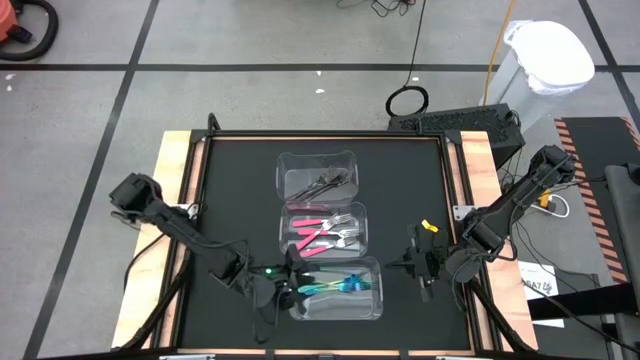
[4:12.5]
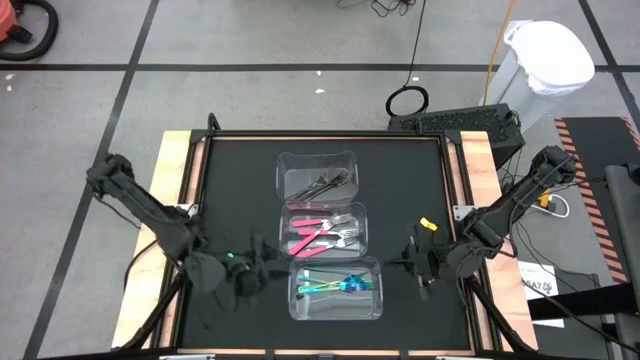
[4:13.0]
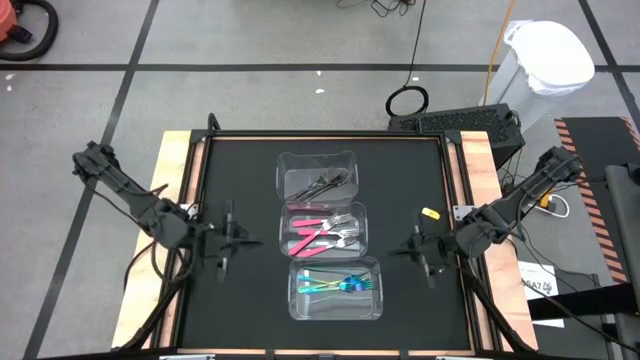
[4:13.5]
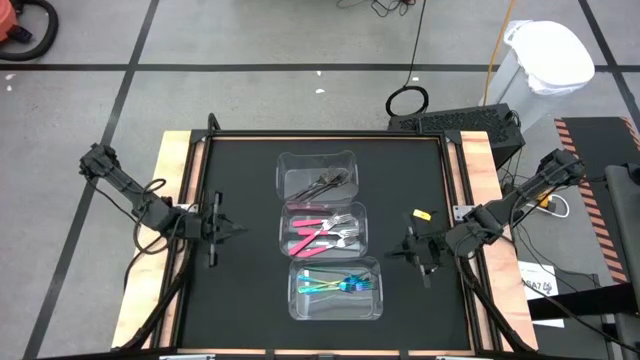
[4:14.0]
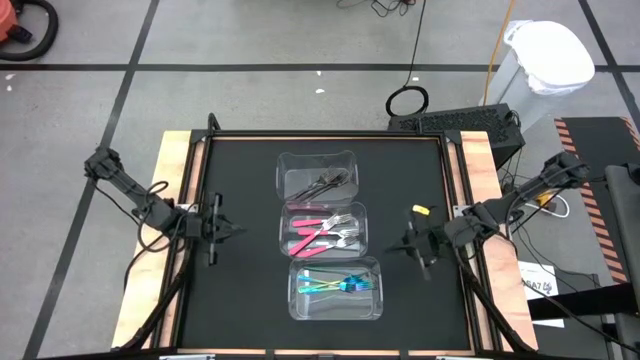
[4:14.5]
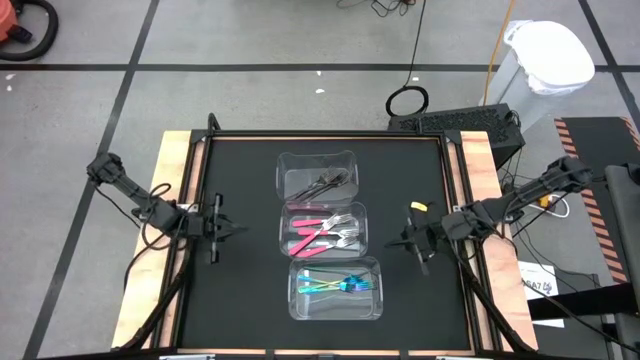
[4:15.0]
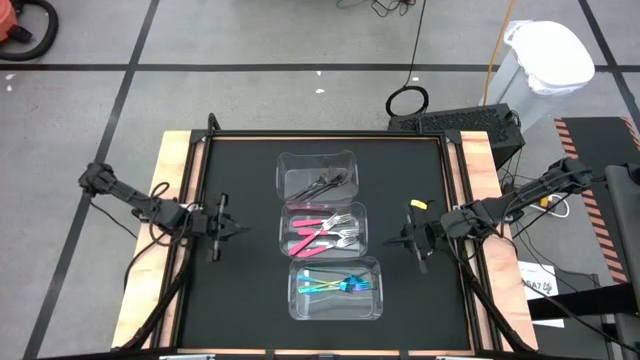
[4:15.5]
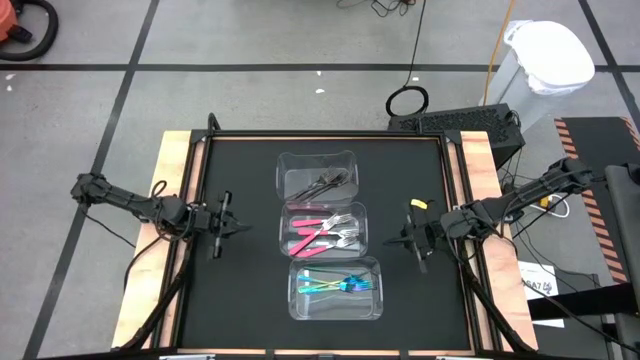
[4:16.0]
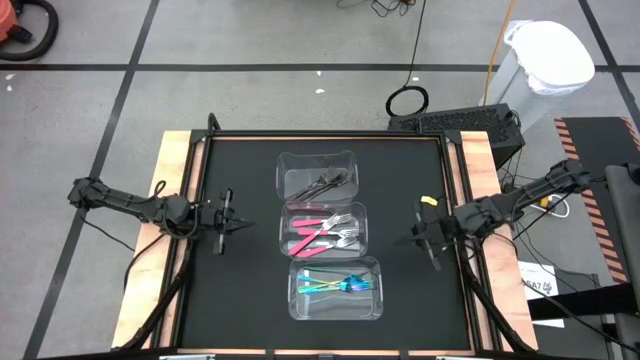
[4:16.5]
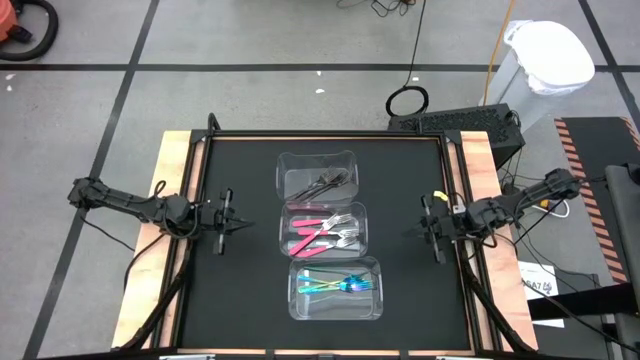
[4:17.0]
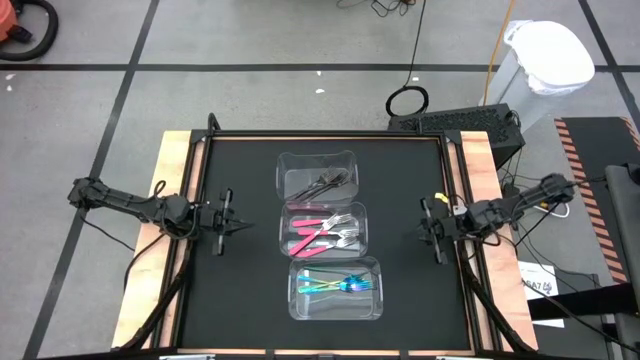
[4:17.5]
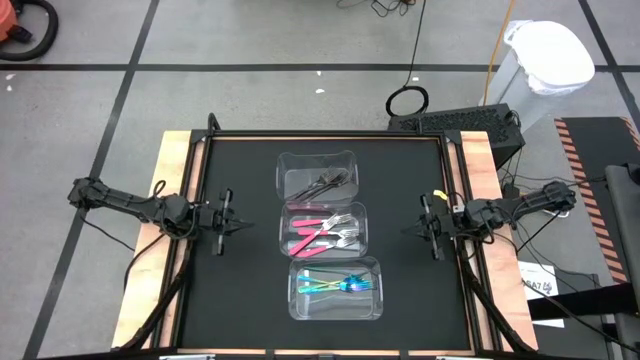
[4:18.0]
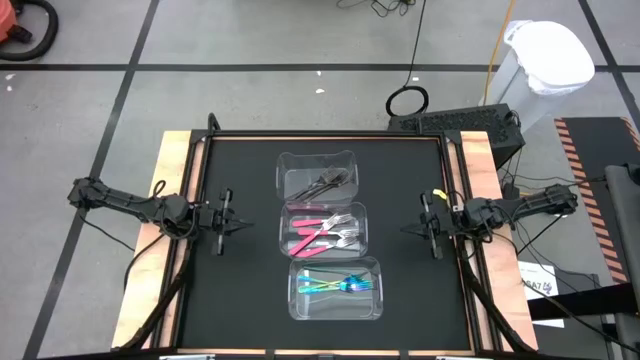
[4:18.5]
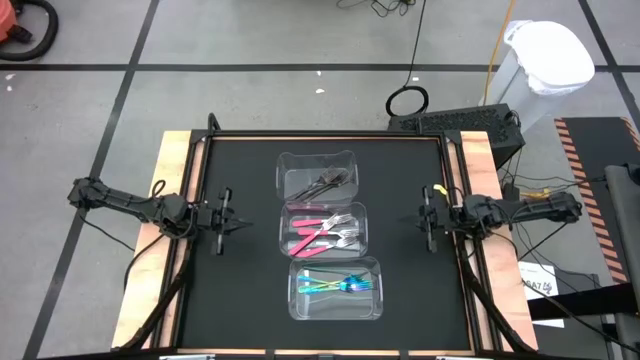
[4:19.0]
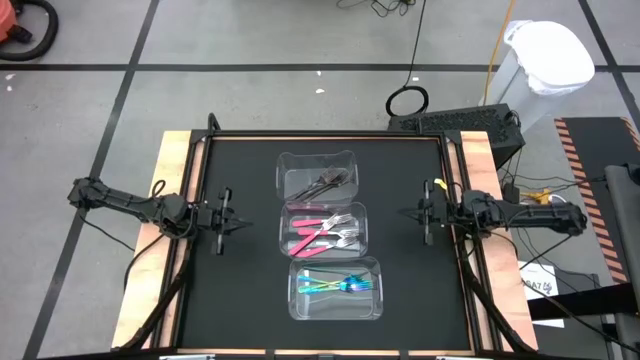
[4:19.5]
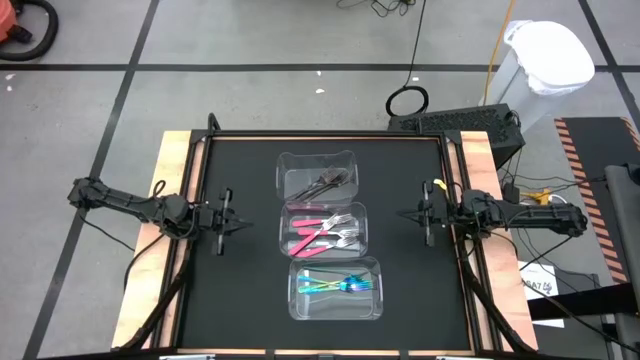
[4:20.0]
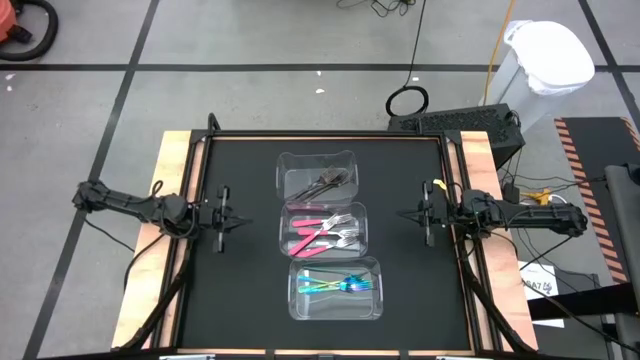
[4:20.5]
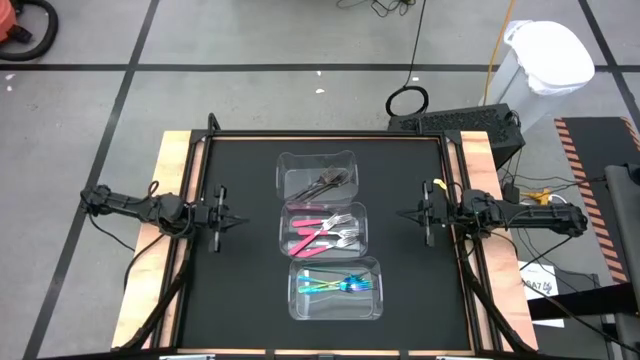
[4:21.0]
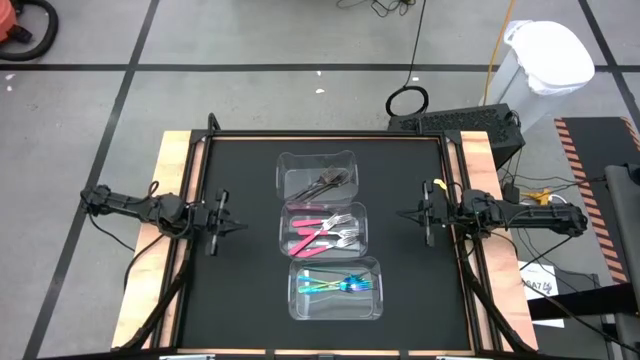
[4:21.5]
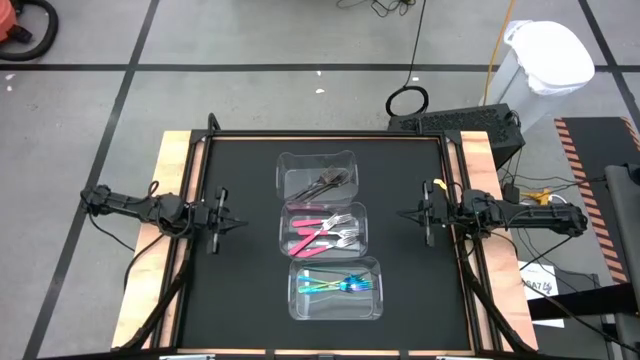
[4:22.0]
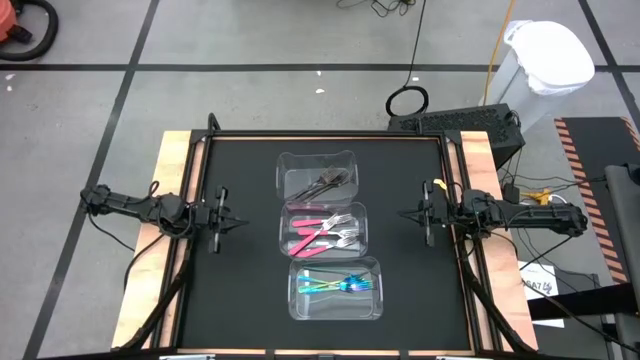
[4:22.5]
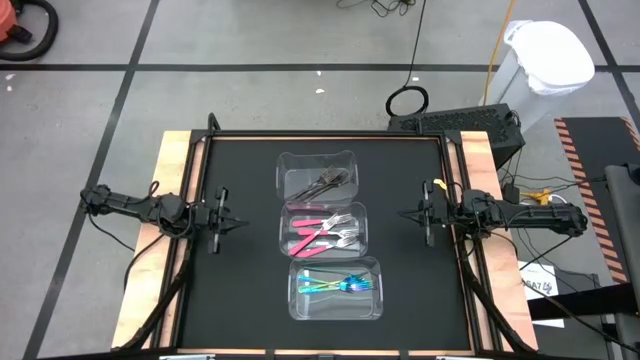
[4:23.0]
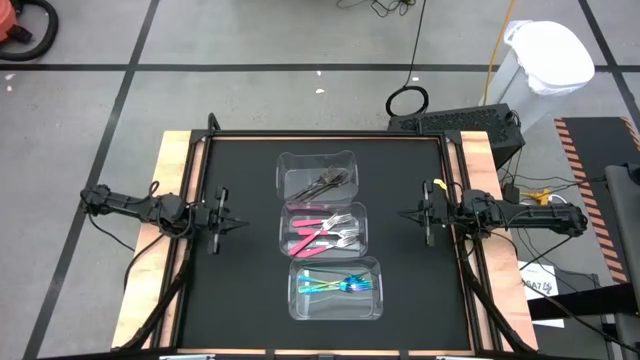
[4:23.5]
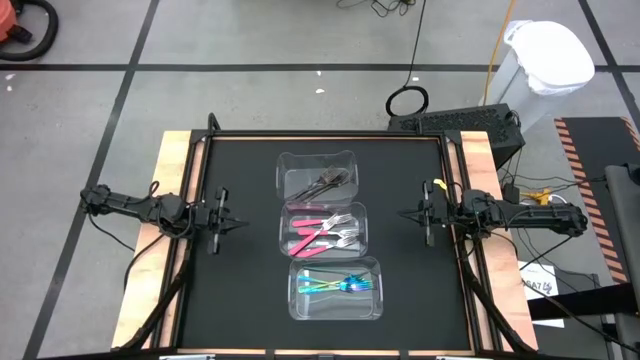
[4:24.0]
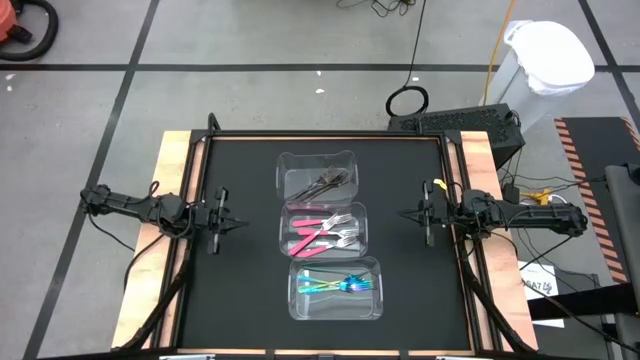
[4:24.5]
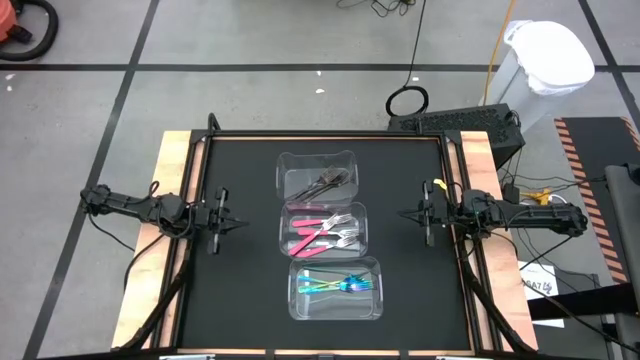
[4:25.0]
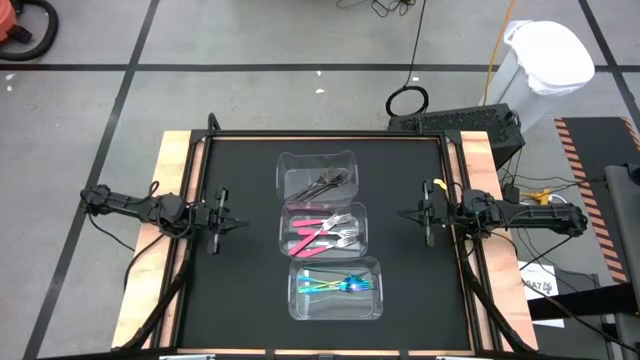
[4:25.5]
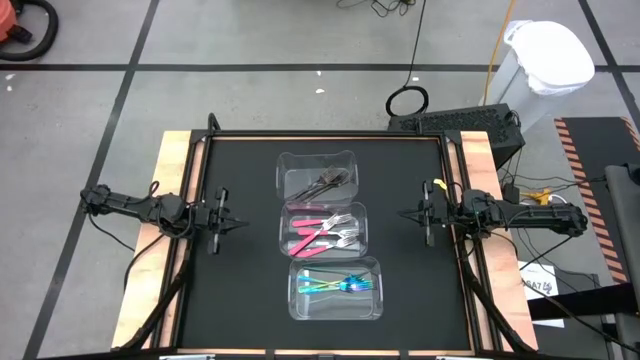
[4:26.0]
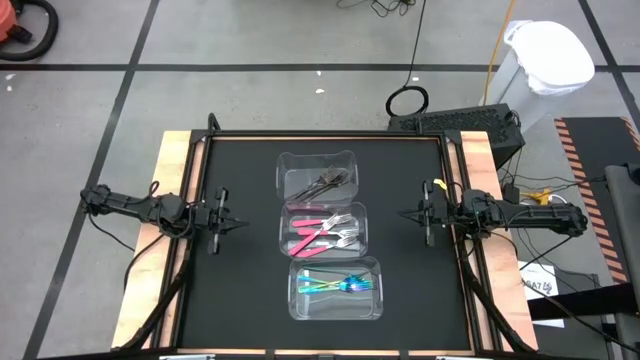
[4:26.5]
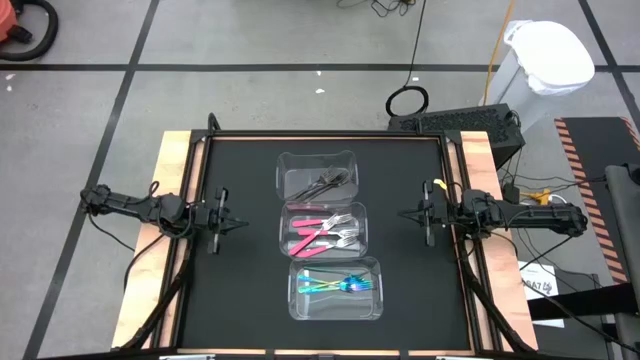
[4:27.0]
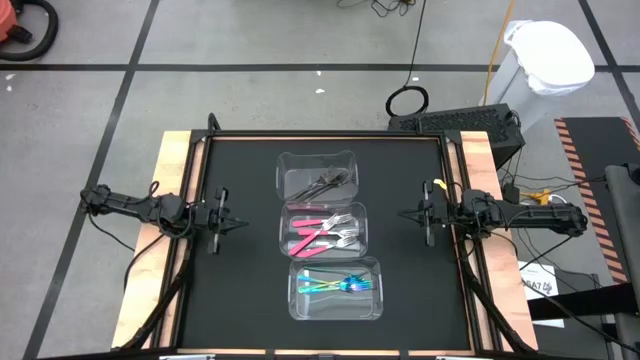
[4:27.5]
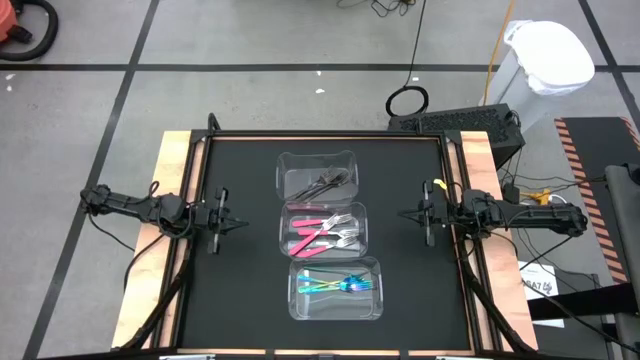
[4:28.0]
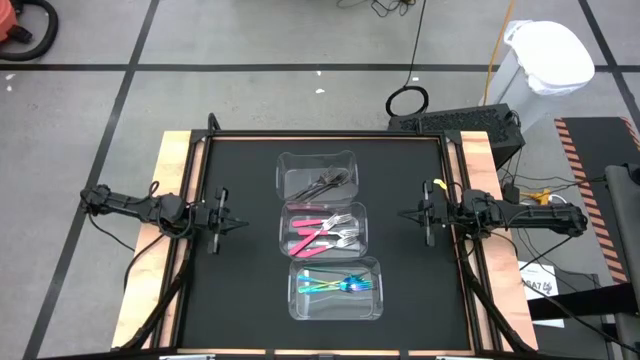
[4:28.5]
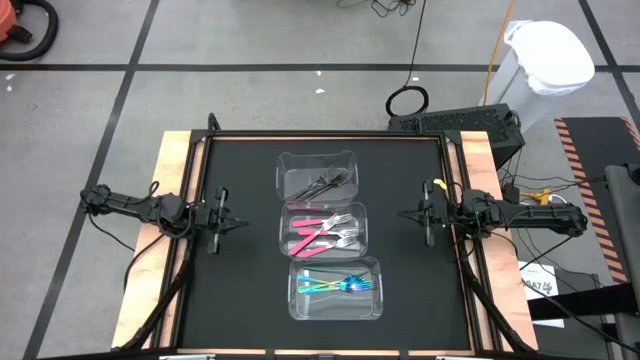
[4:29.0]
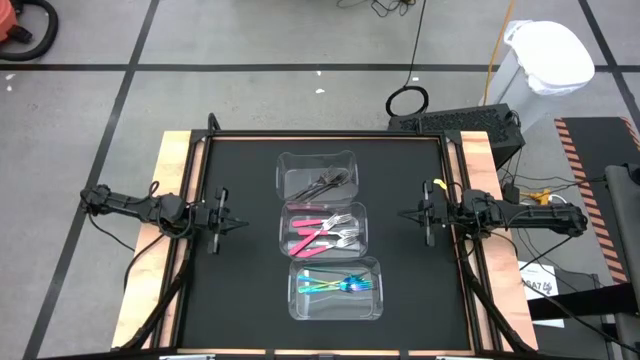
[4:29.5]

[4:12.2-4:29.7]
Task: Sort silverware by color (type)
Return to Home Position

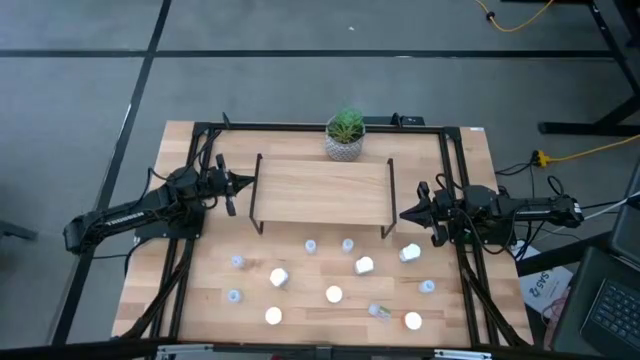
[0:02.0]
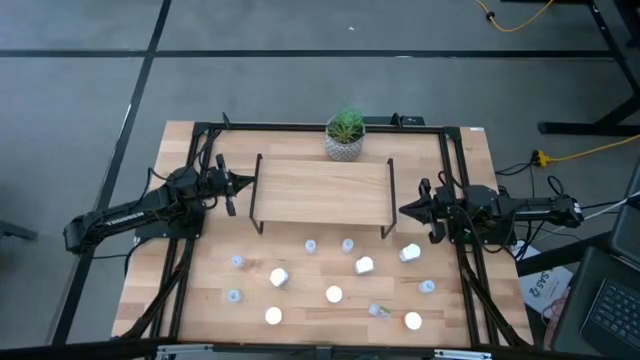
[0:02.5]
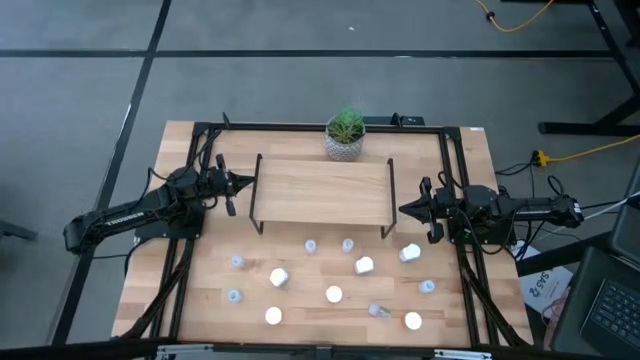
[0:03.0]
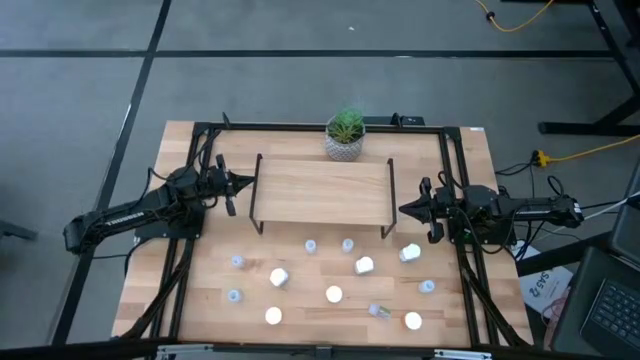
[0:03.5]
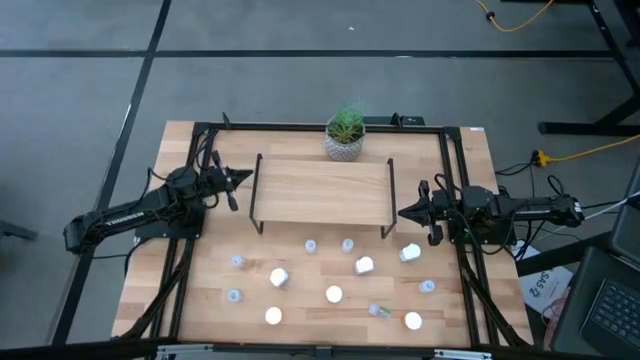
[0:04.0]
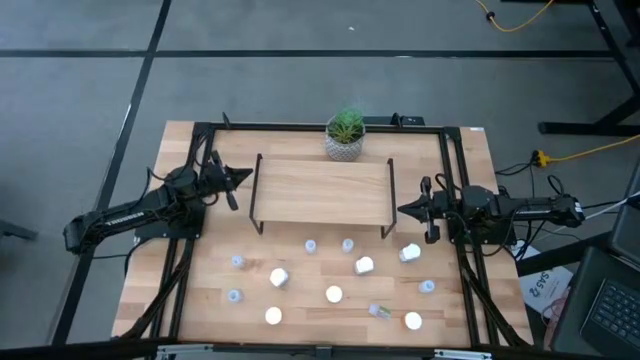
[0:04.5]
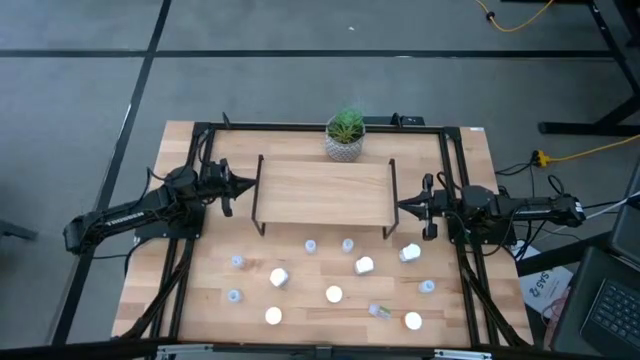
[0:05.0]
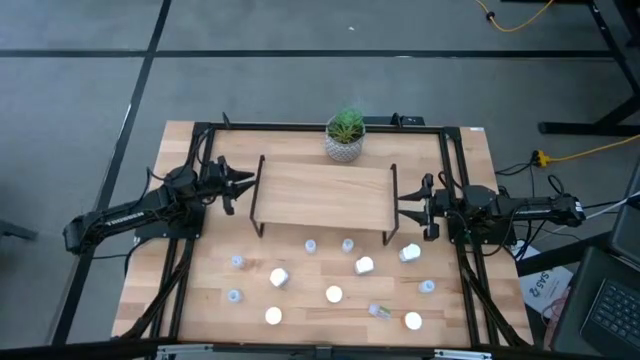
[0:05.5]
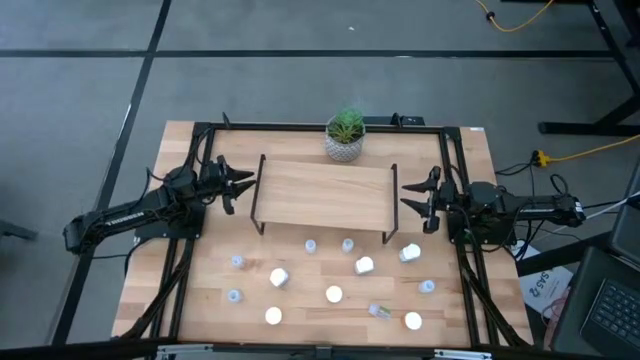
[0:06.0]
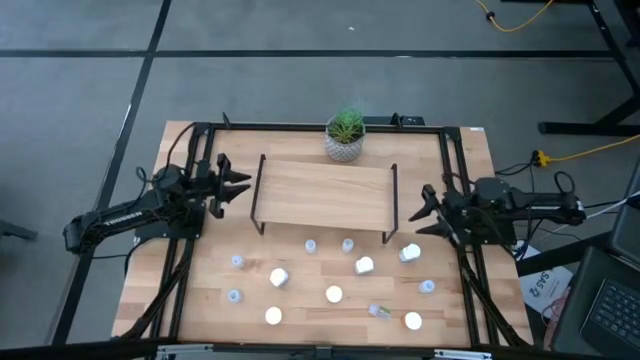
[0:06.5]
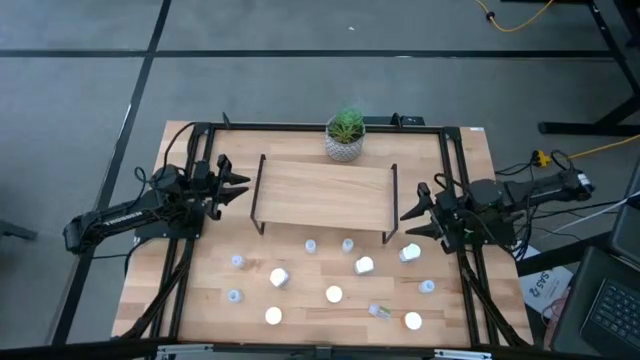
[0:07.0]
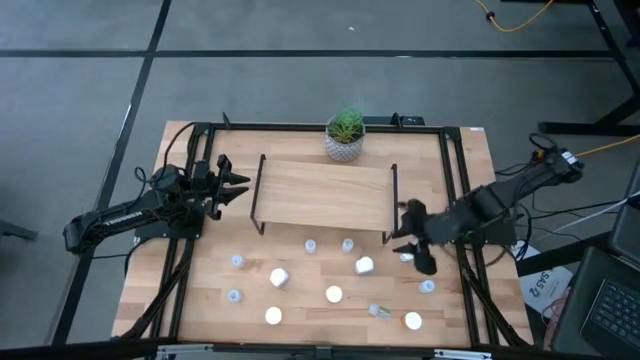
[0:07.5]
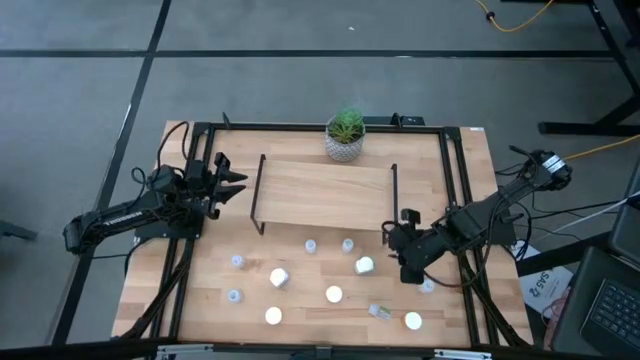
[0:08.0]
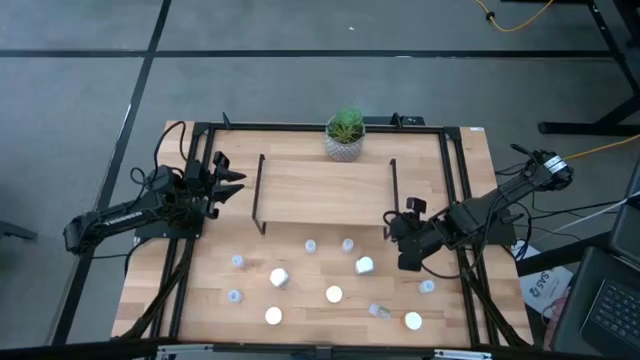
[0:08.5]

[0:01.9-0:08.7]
Task: Pick and place medicine bottles onto shelf by color
Adjust the shelf on the table
